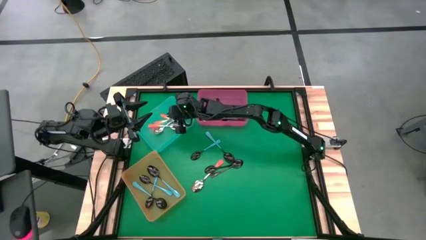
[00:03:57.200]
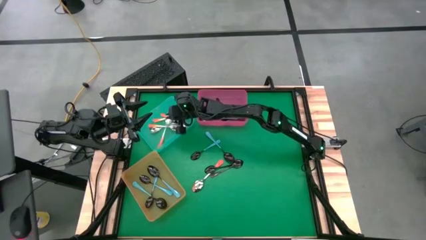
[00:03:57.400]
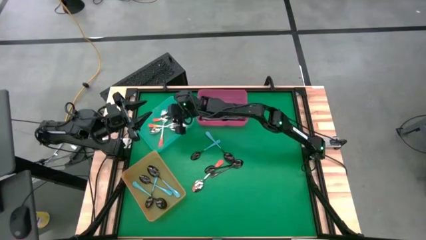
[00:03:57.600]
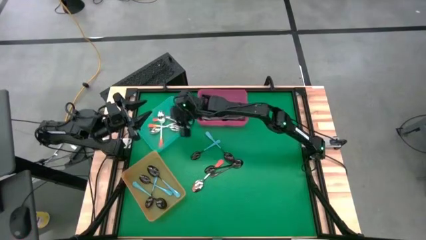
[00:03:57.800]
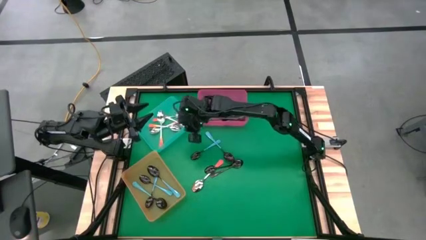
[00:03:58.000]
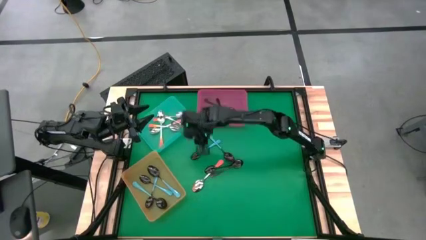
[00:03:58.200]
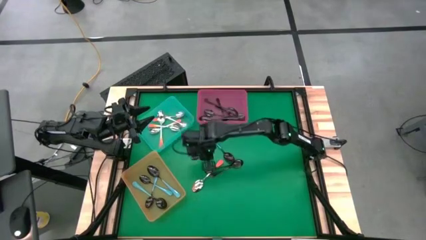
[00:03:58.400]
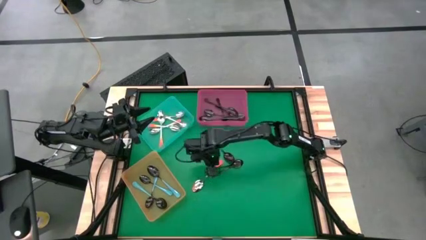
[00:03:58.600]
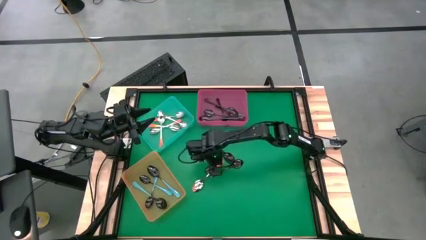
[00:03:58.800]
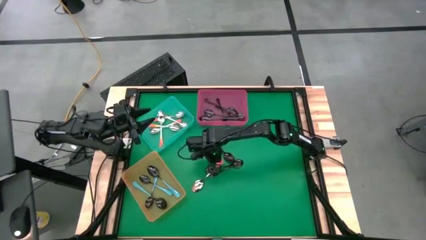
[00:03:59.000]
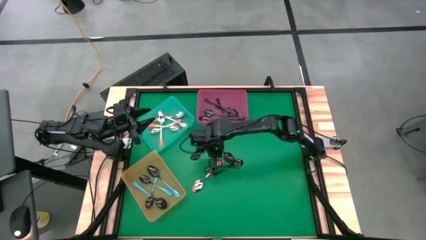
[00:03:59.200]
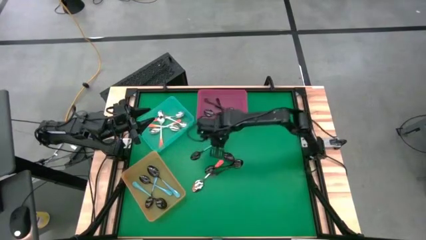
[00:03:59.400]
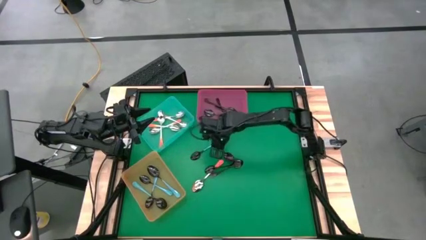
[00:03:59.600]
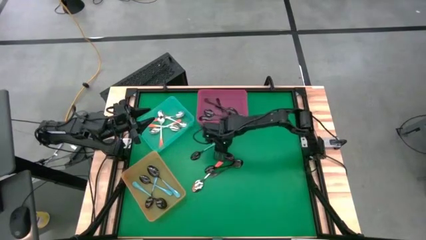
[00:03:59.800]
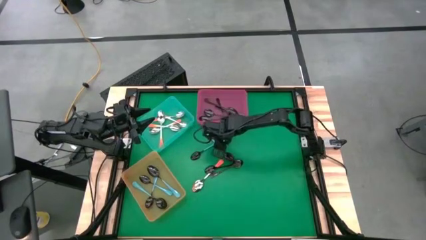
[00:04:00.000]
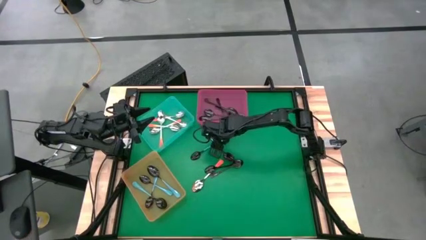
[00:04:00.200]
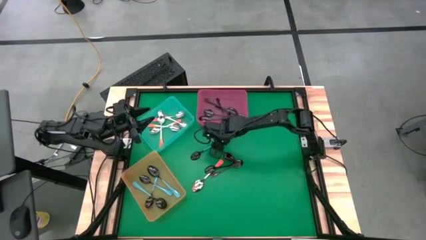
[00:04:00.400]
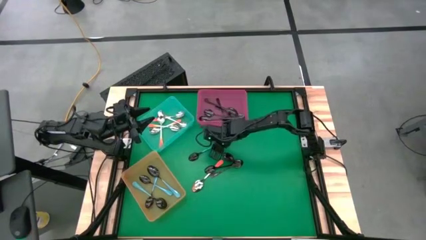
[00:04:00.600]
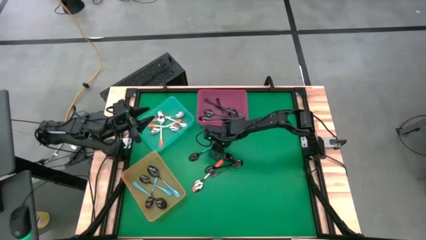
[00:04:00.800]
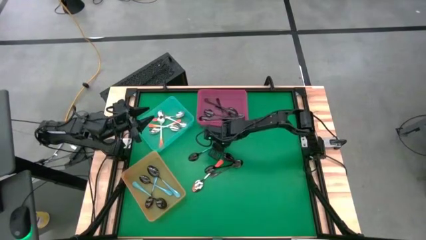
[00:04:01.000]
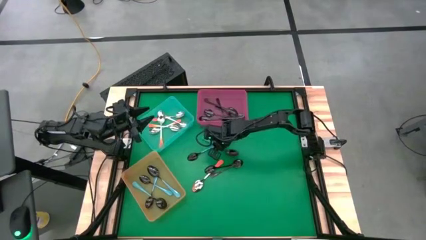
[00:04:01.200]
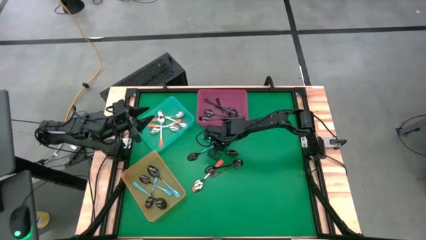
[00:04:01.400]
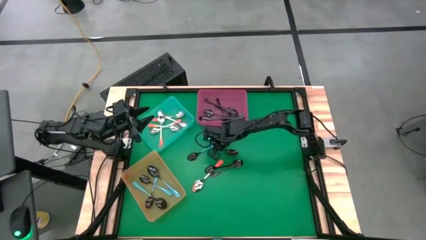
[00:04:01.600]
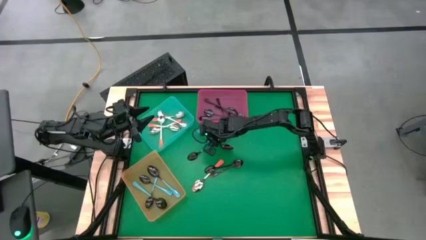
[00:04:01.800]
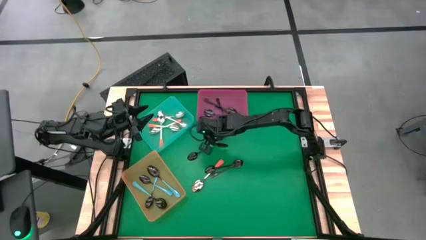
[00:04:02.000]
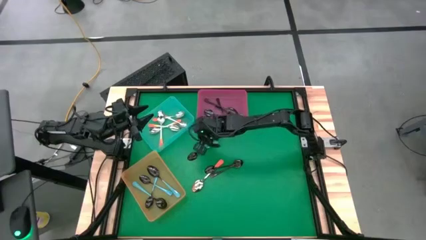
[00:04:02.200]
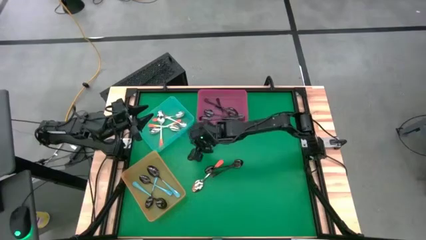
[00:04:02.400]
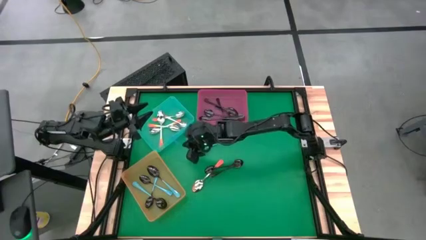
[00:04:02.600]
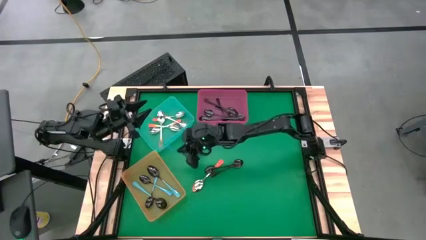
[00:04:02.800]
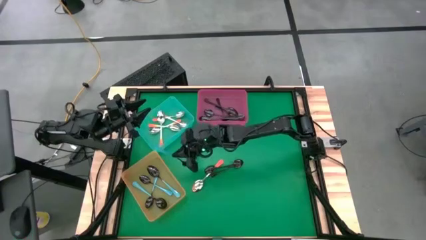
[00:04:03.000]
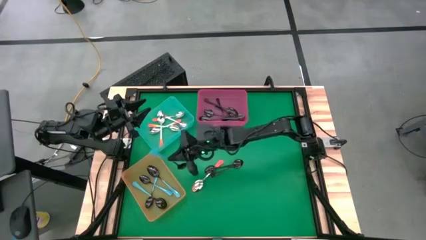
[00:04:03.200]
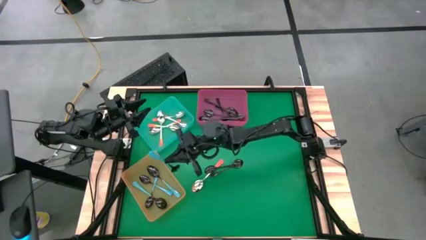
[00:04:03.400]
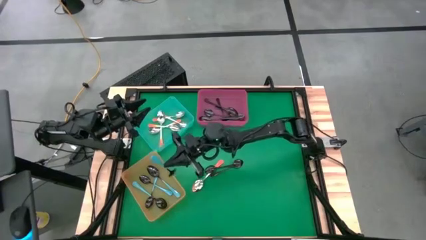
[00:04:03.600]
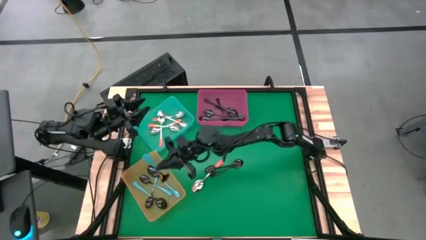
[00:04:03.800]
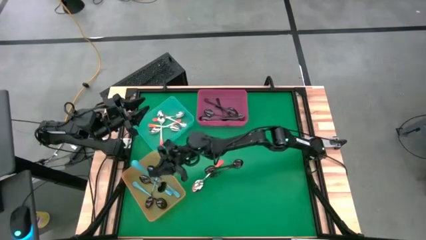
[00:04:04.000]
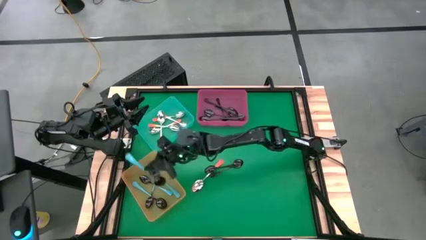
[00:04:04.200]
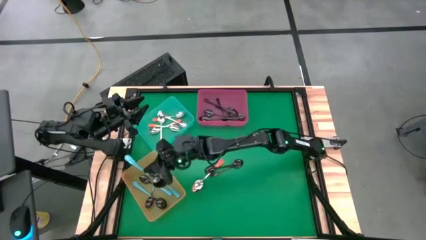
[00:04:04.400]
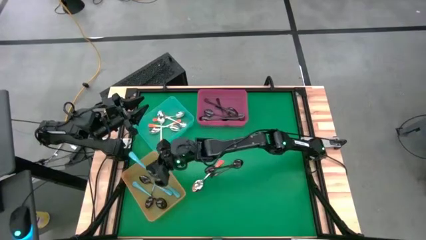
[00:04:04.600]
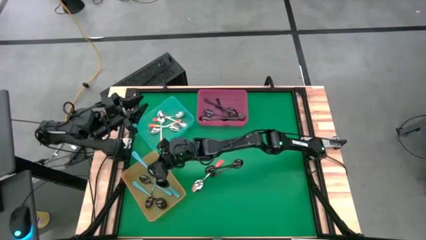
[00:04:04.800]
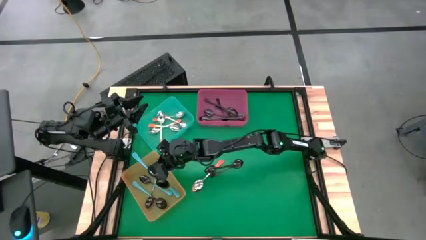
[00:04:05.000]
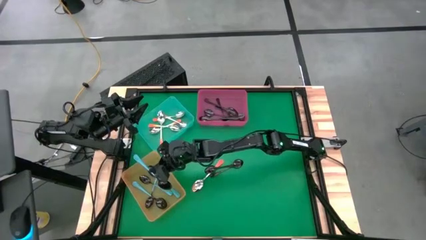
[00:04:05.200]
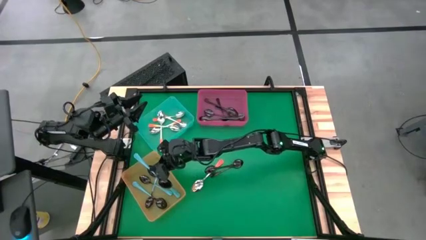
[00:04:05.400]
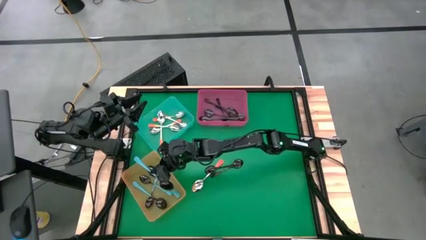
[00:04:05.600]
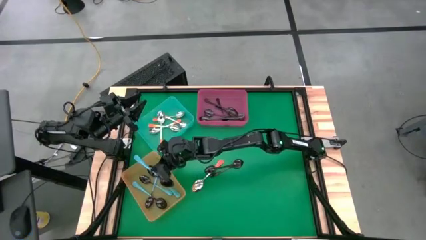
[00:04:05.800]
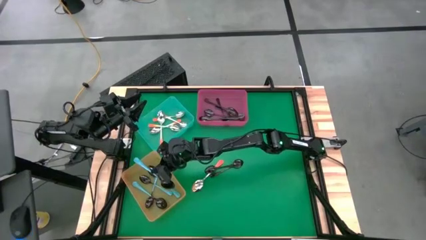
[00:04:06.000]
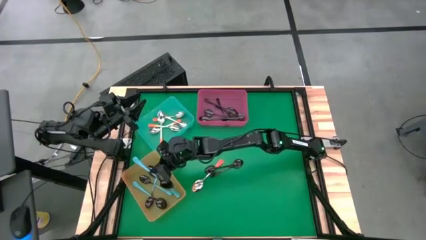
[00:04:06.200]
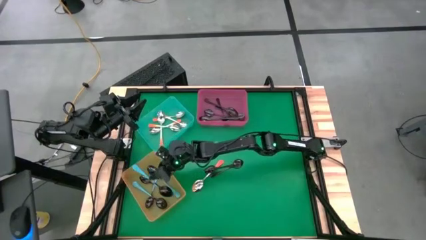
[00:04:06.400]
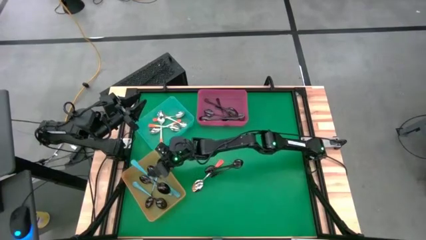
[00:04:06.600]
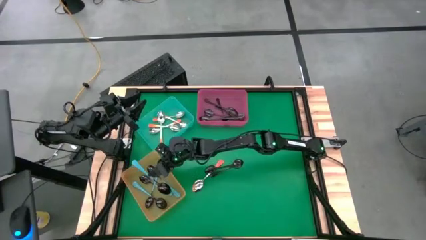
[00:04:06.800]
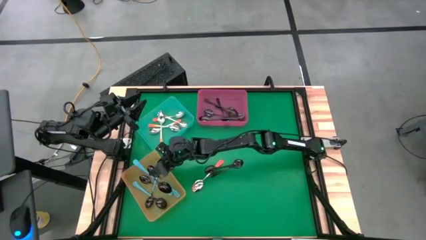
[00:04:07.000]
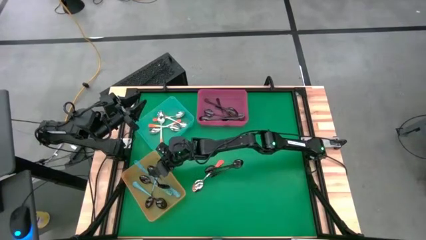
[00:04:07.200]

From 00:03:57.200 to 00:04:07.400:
Task: Sort silverware by color (type)
Put the blue spoon into the orange bin

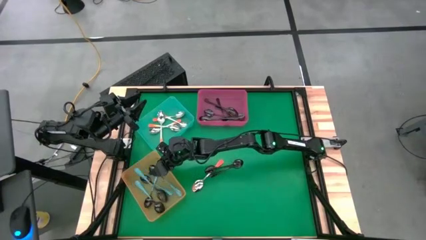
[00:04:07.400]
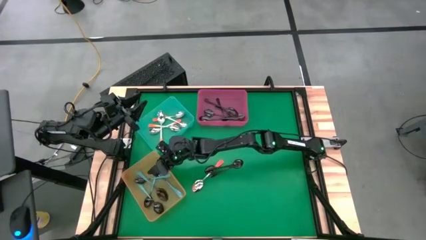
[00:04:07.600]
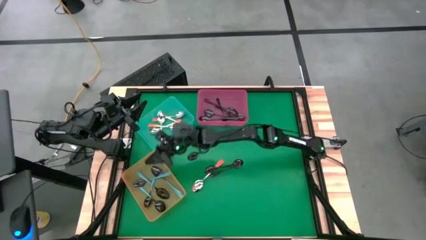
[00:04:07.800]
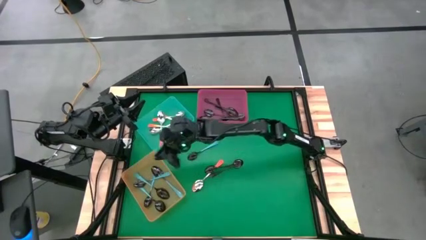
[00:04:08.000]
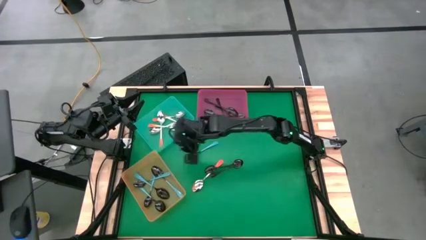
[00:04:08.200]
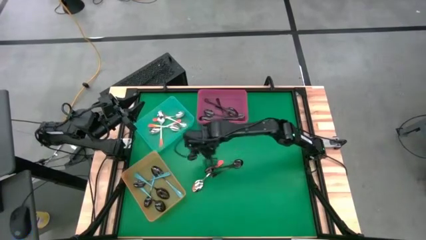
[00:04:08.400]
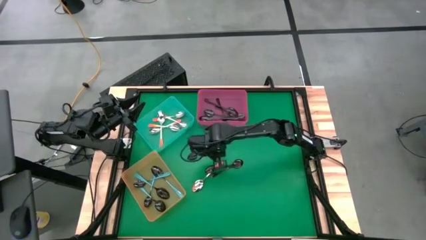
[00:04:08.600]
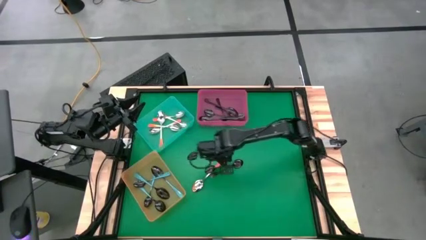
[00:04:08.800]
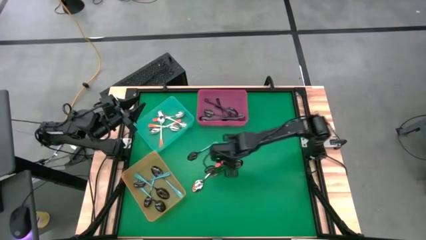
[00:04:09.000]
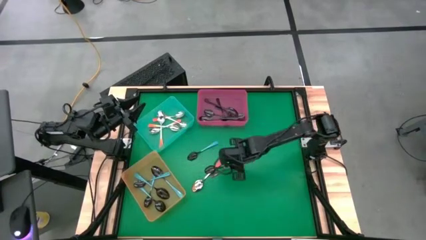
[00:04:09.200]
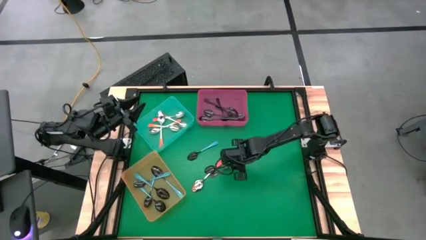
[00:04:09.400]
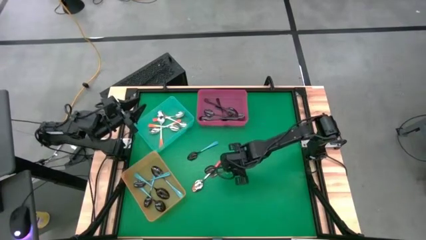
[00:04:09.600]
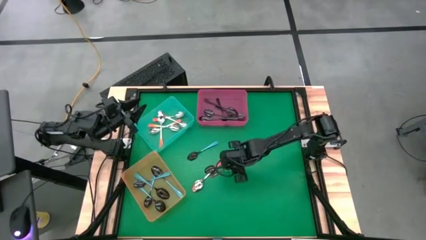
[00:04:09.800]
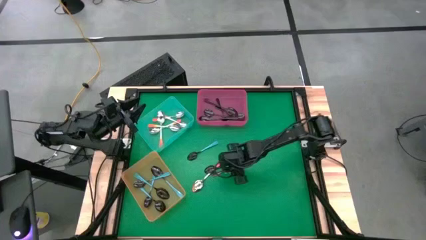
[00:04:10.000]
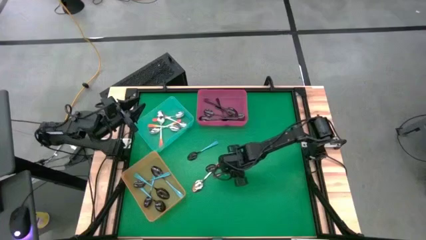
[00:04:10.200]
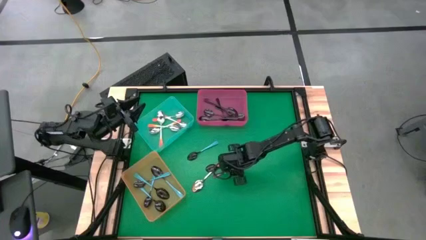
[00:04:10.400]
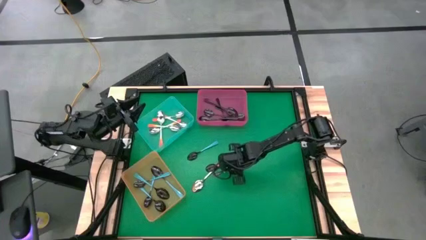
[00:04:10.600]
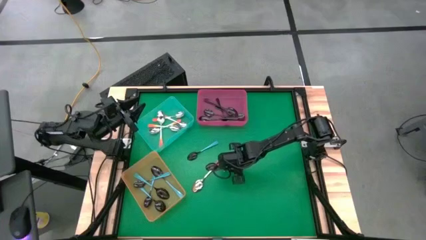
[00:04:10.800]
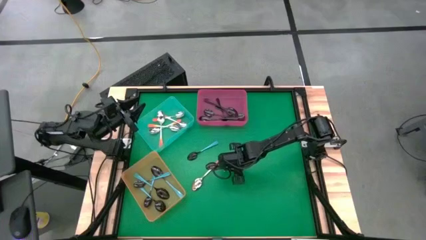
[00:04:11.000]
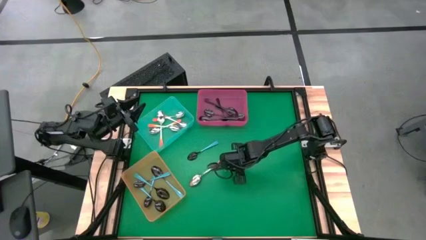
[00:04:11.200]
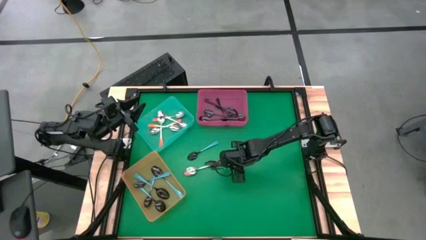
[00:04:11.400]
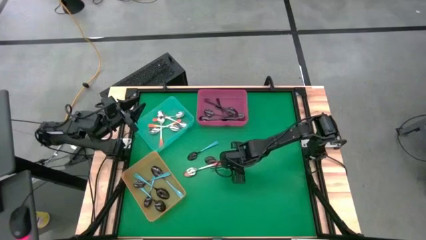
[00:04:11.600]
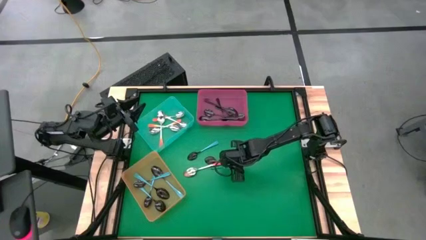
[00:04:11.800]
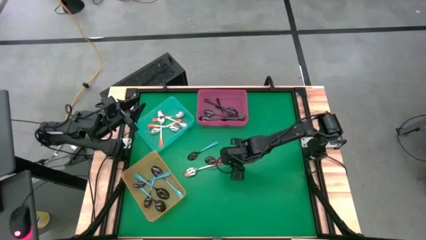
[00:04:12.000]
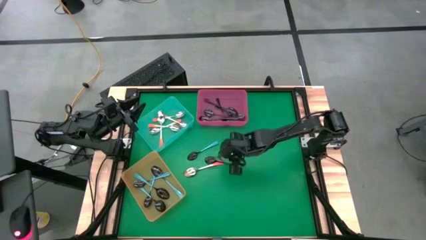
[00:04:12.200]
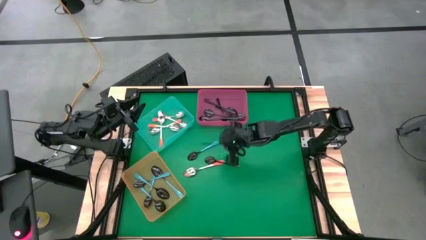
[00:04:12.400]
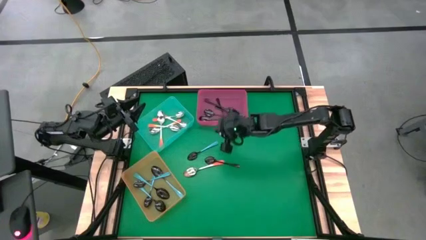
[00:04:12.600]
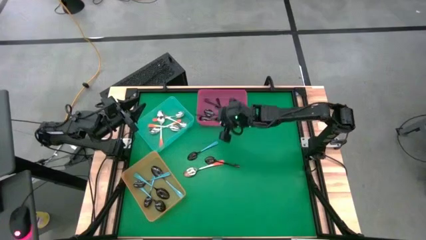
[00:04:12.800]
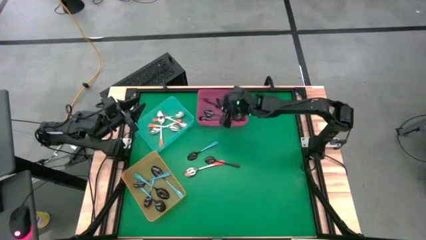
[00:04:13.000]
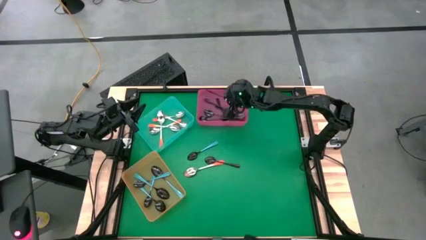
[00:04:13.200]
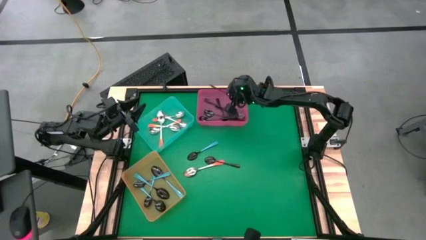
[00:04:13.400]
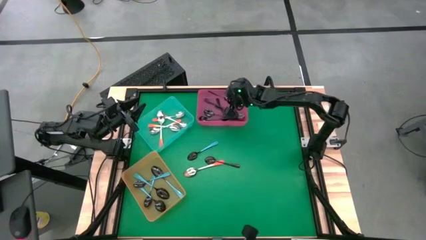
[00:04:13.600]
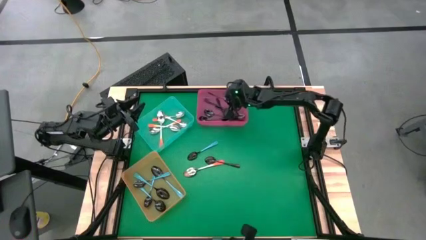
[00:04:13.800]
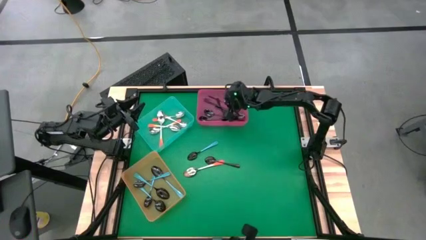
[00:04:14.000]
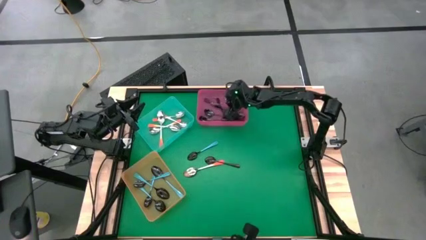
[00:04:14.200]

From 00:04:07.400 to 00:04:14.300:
Put the black spoon into the pink bin
